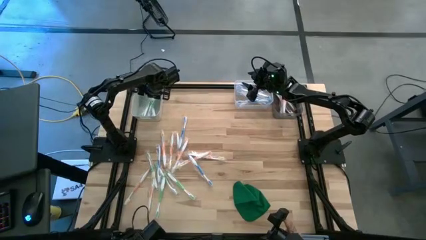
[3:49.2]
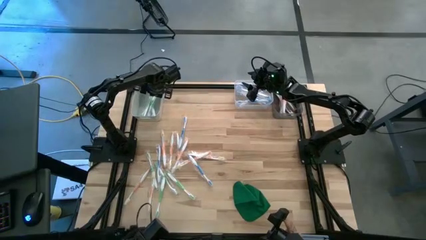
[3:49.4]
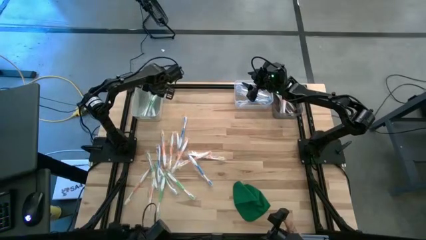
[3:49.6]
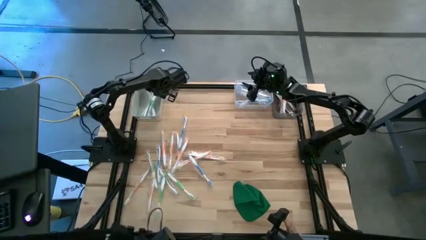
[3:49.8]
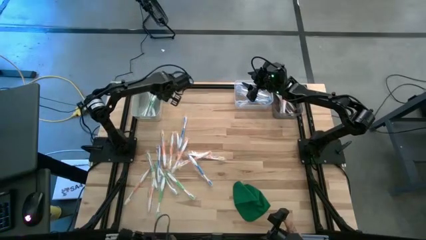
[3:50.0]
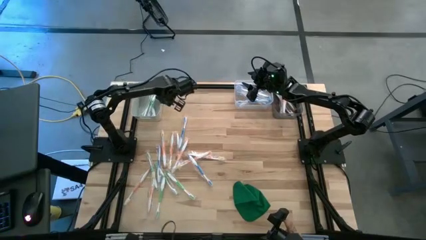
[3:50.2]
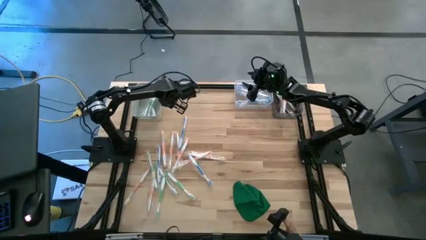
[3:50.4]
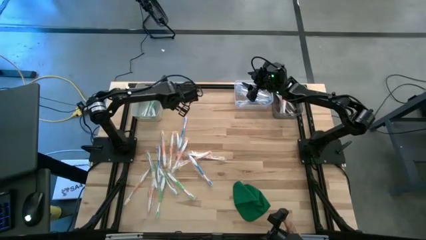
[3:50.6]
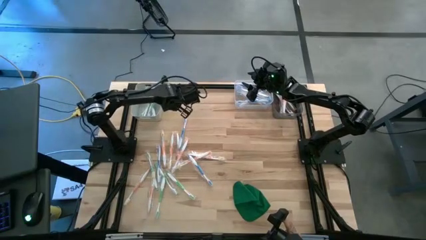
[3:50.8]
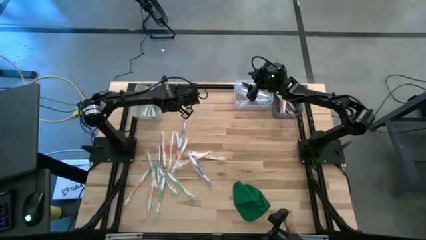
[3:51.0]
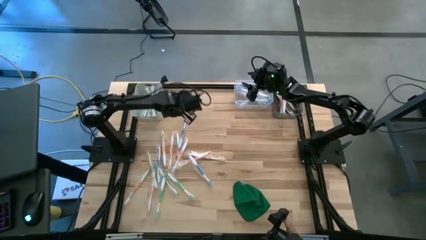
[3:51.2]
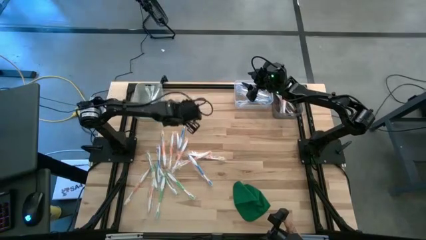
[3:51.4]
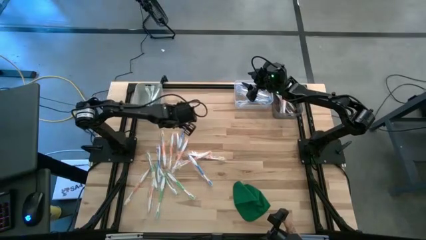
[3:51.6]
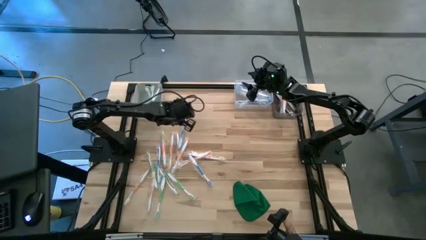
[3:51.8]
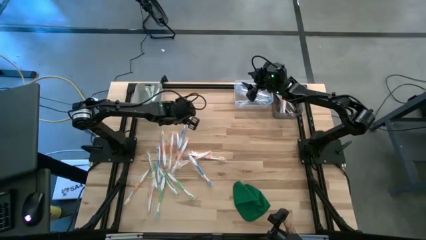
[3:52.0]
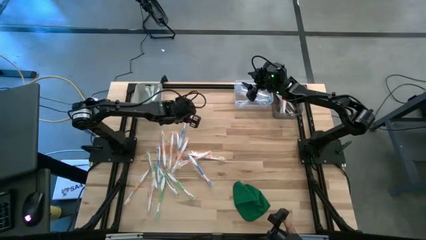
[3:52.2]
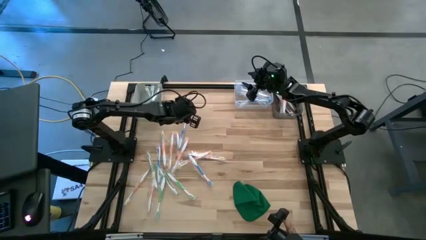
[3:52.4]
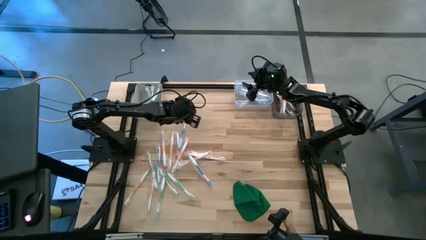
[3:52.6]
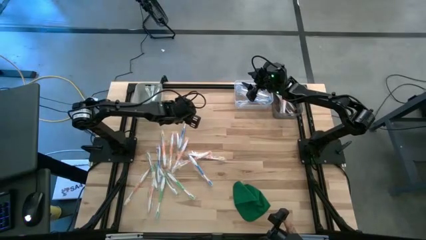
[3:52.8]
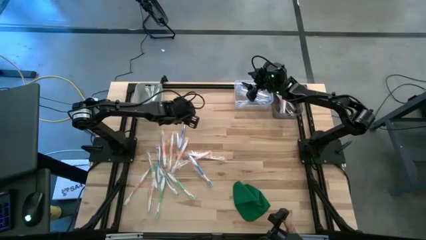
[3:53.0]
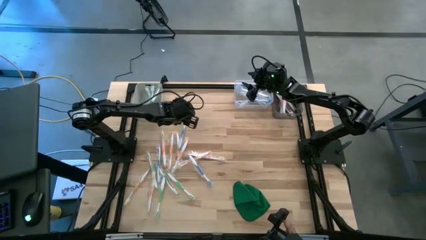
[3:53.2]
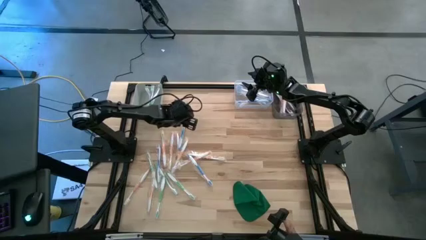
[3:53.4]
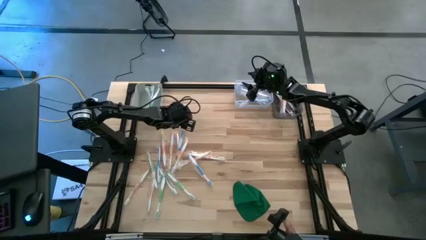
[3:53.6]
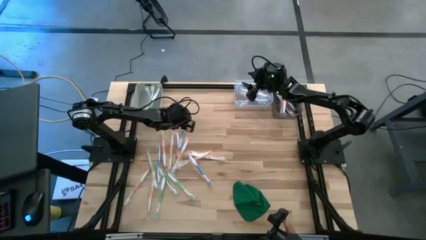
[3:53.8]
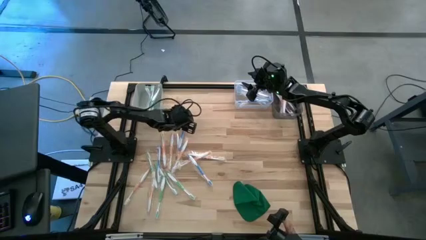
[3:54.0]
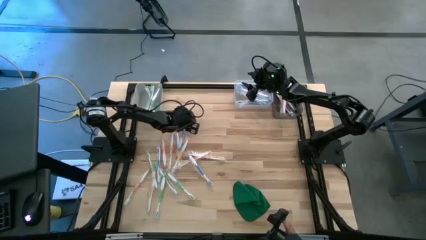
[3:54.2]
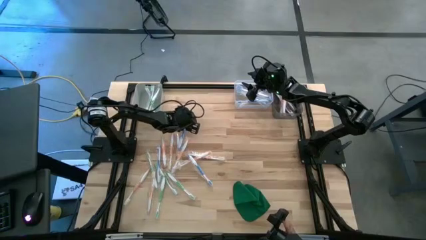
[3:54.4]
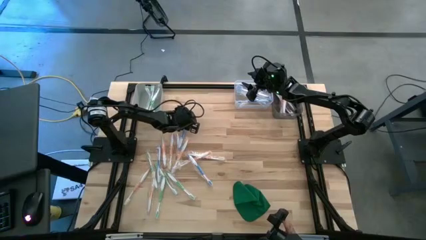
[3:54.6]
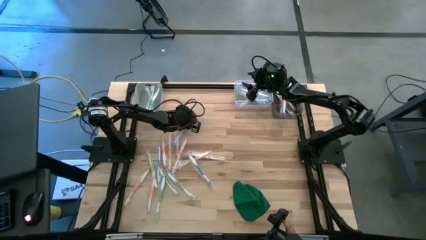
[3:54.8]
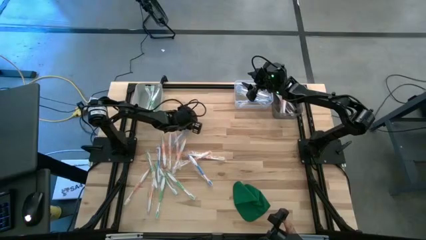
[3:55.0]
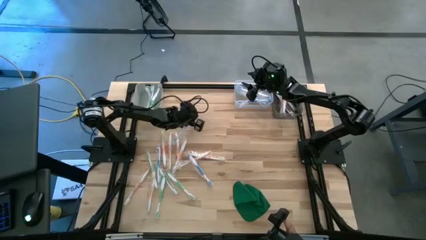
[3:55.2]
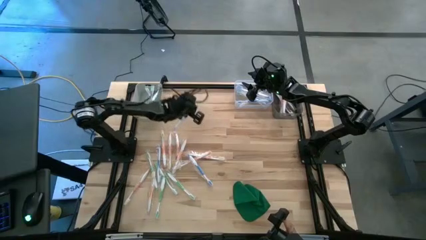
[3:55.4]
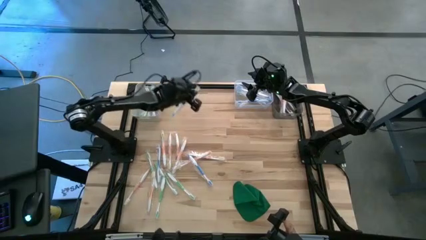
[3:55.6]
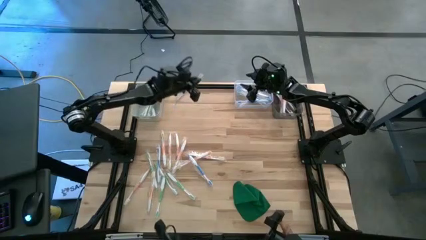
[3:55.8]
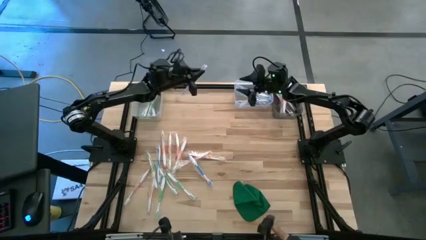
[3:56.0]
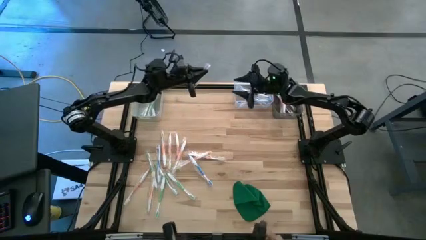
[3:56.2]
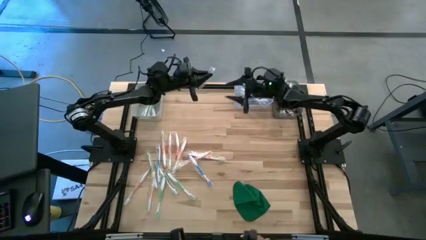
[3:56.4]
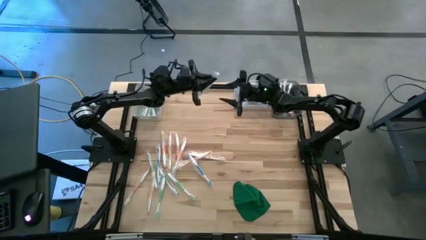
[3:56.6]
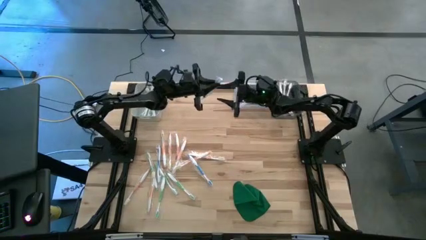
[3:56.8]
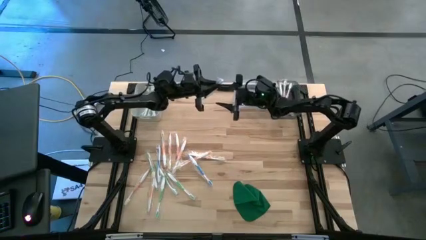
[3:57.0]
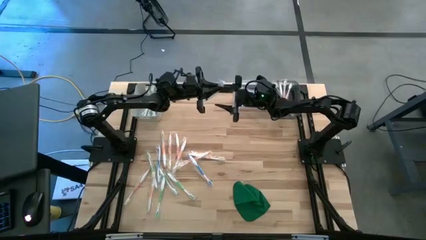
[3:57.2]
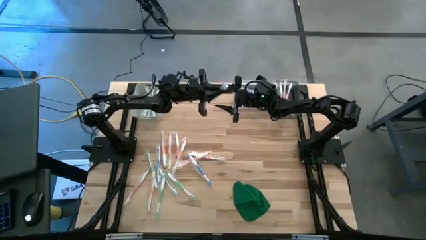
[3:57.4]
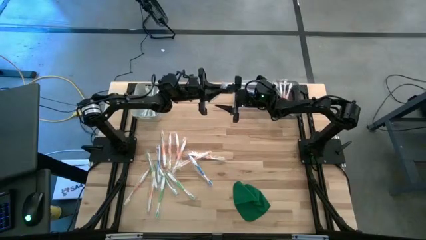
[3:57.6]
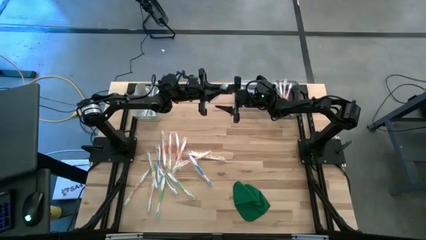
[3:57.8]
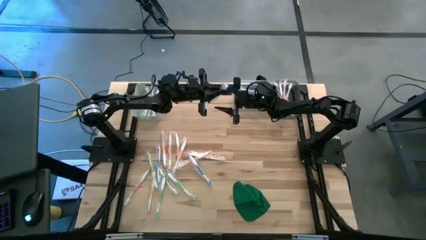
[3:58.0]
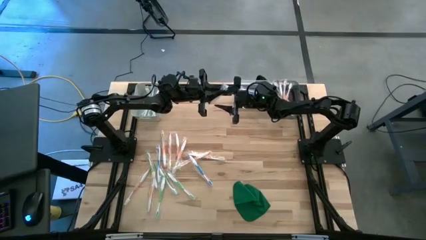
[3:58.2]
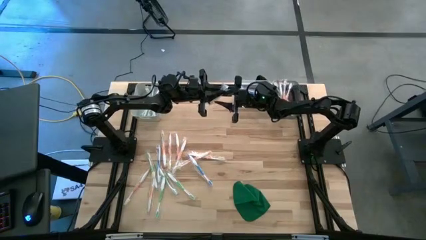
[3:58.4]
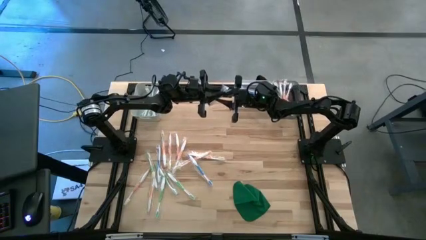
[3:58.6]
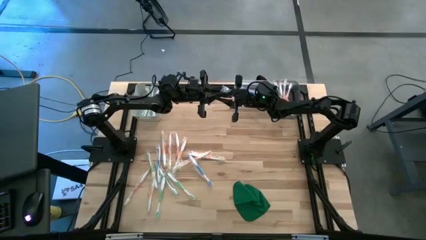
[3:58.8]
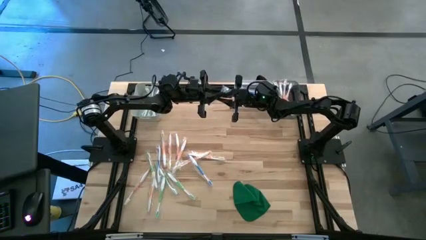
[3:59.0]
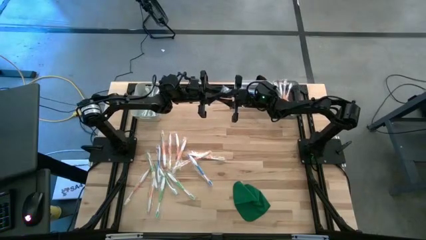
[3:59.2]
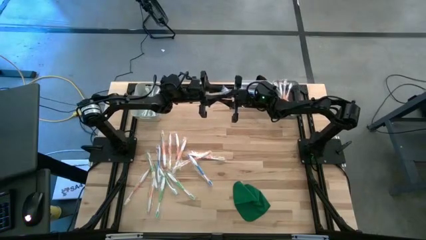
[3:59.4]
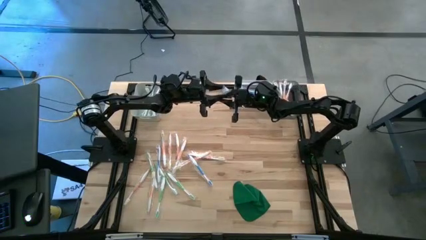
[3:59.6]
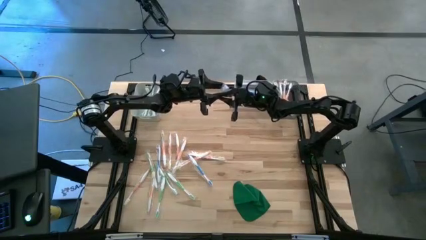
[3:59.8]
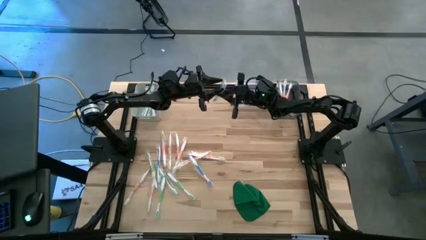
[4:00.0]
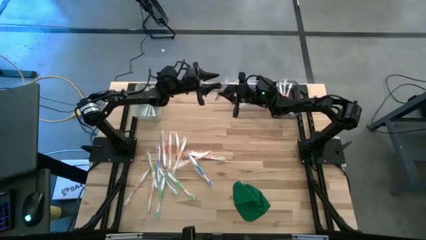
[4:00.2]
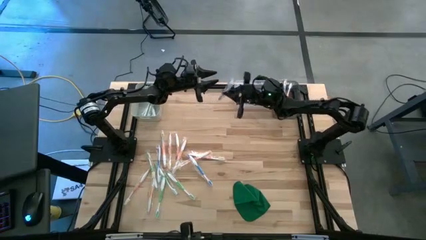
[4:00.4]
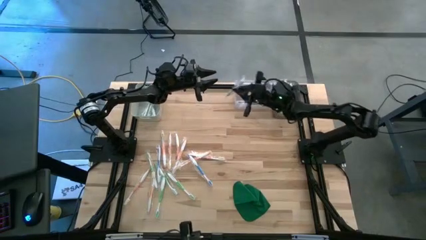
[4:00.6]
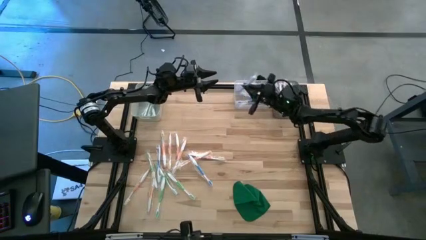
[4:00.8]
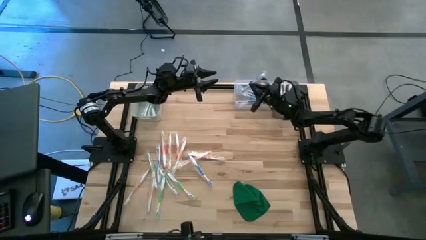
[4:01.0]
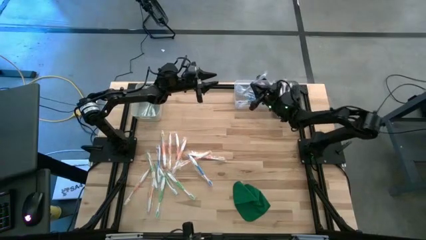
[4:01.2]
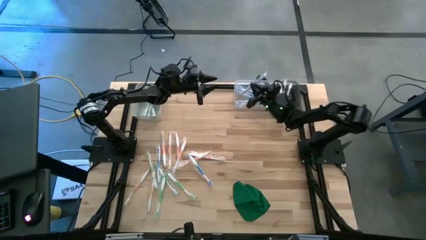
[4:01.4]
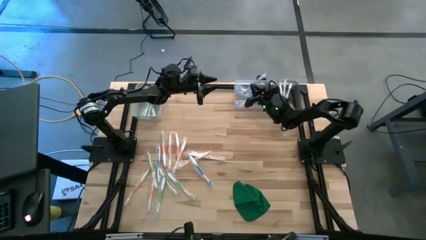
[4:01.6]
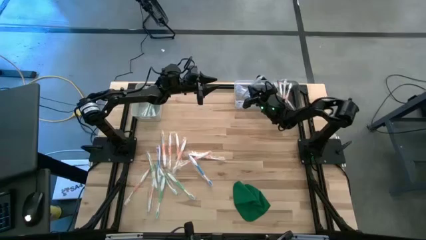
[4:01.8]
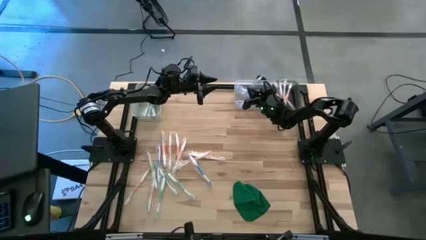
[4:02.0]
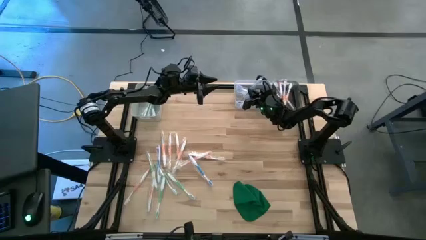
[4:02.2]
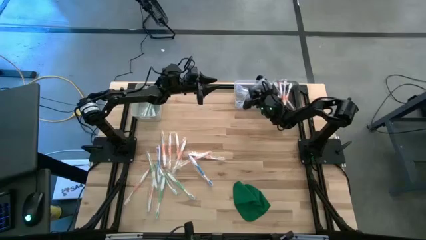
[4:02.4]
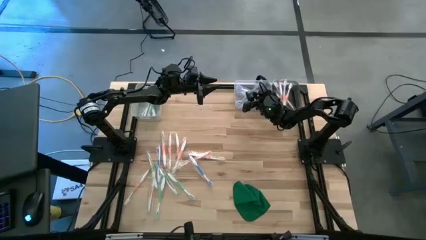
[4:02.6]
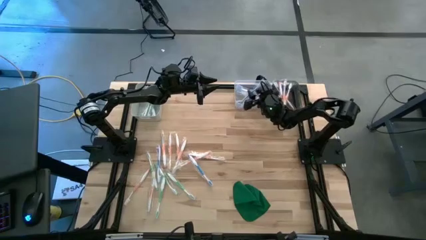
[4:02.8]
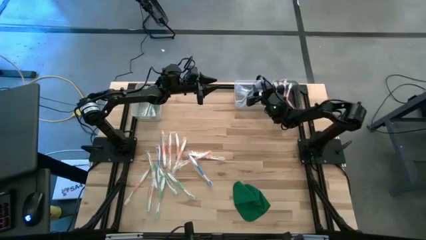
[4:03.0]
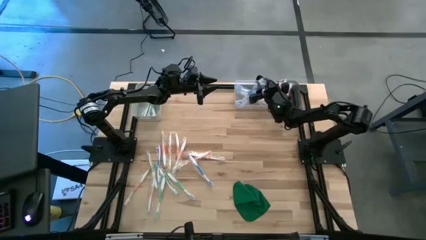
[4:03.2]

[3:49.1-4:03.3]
Task: Pick & Place Toothbrushes
Put the blue toothbrush into the transparent bin
